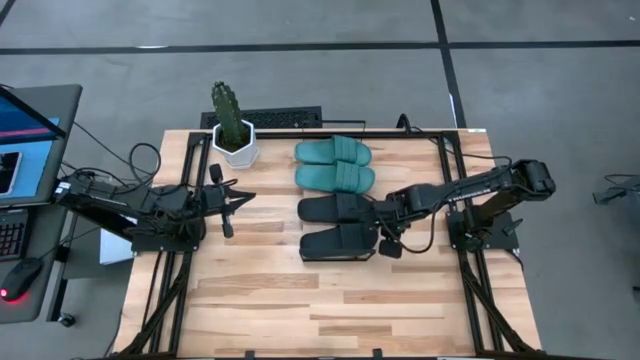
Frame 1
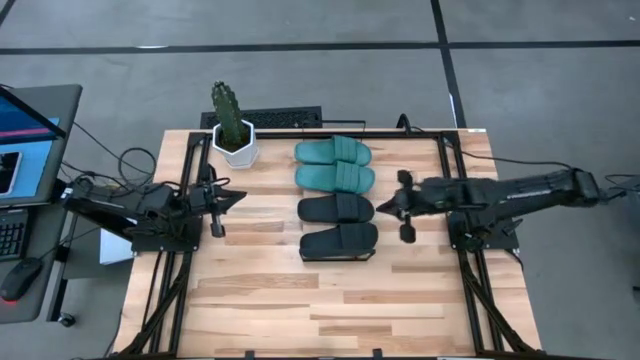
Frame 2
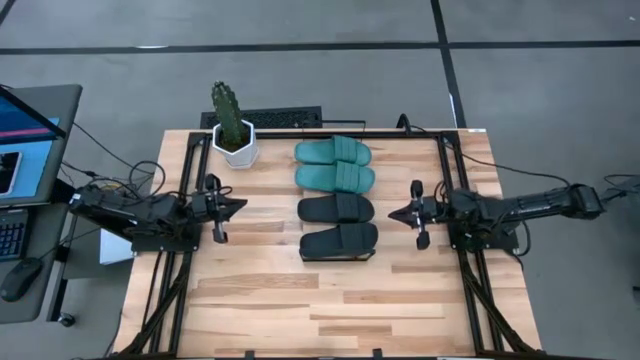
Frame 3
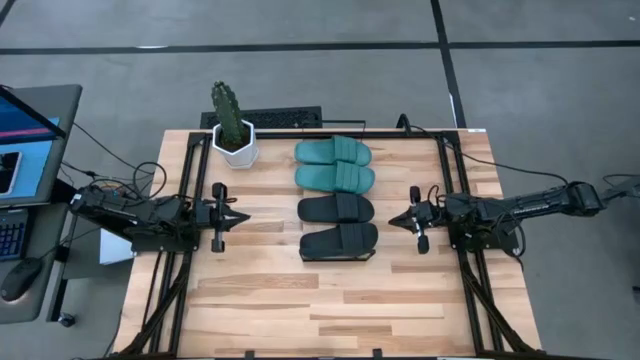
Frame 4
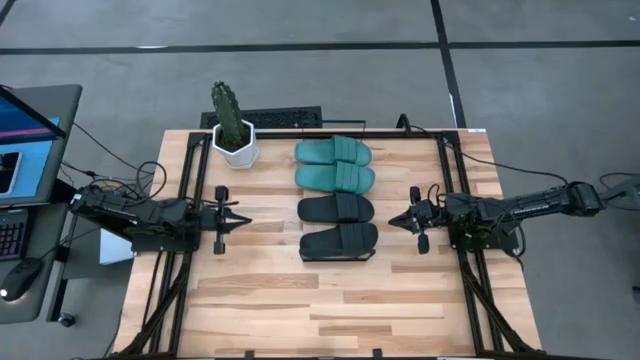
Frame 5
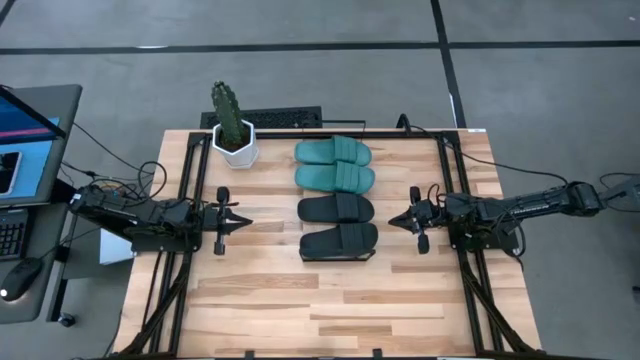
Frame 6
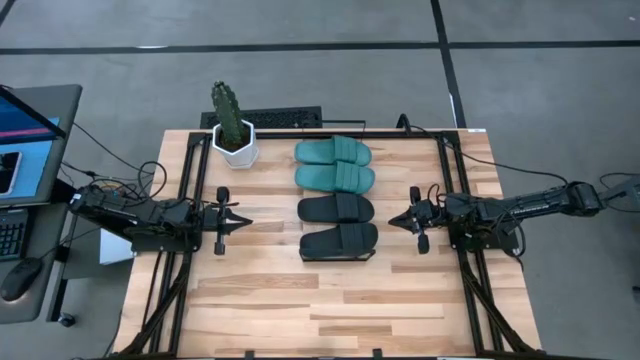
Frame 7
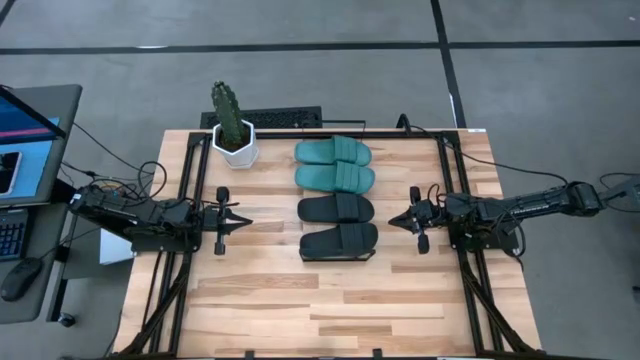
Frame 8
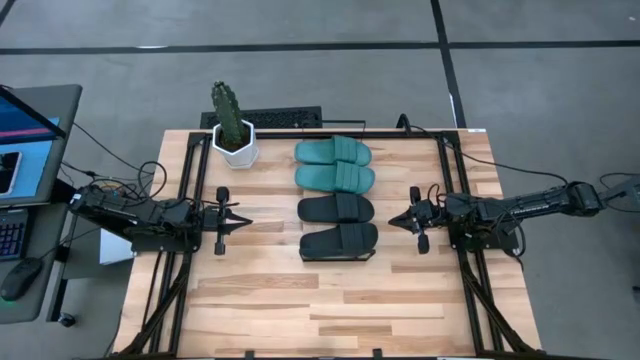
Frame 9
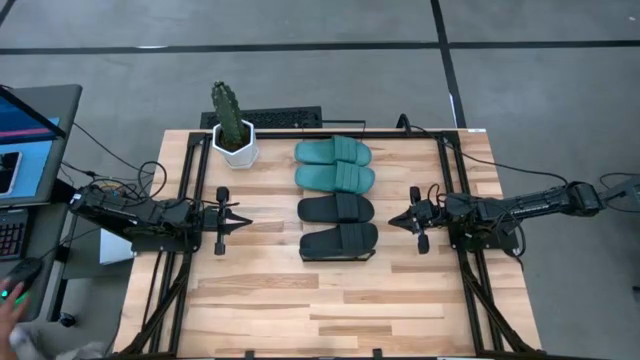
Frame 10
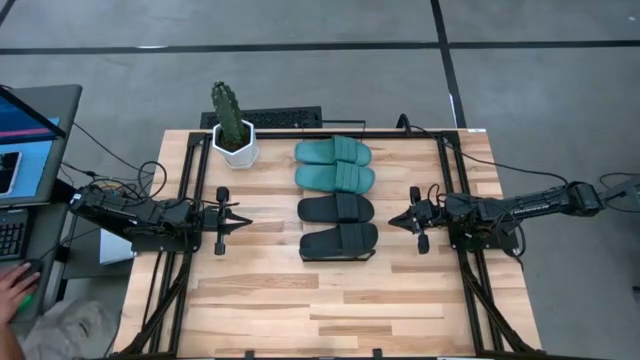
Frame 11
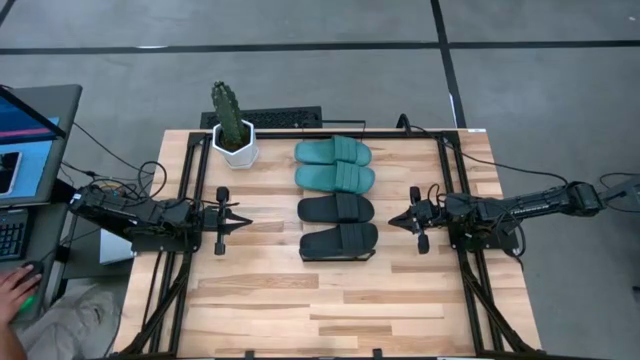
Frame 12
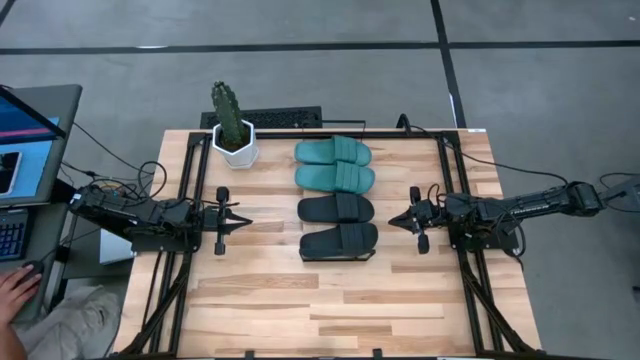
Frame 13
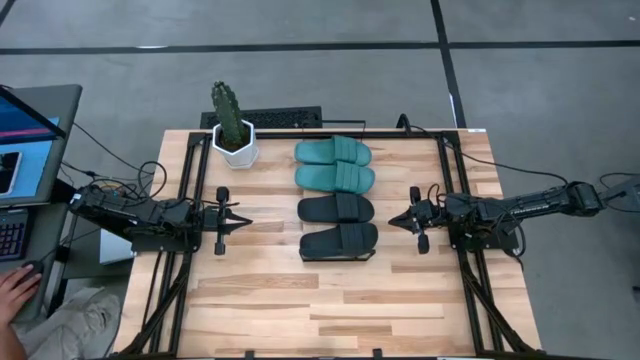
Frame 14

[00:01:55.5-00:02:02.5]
Task: Pick and place slides into the shelf
Return to Home Position

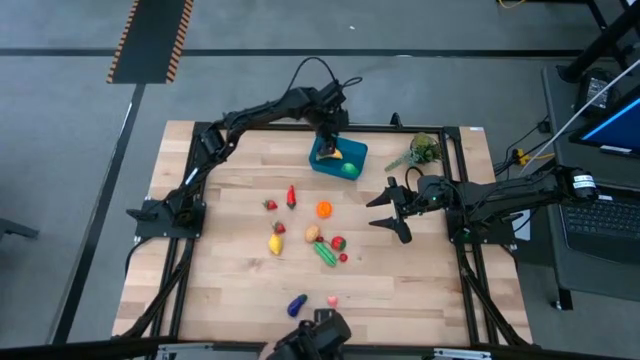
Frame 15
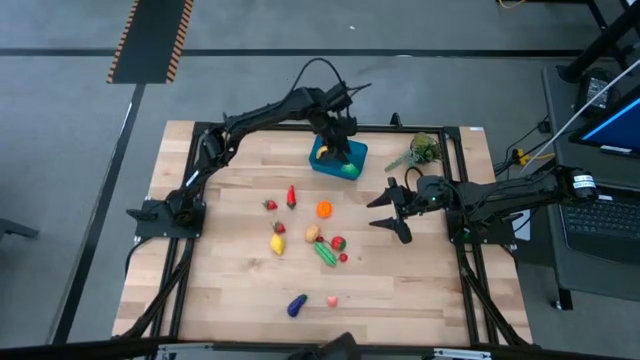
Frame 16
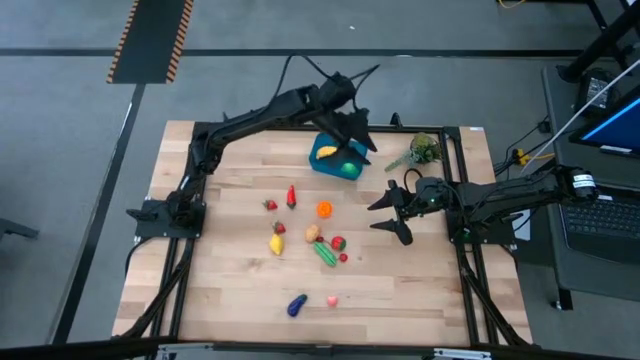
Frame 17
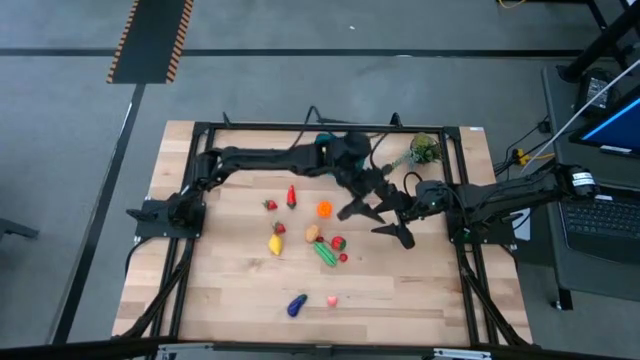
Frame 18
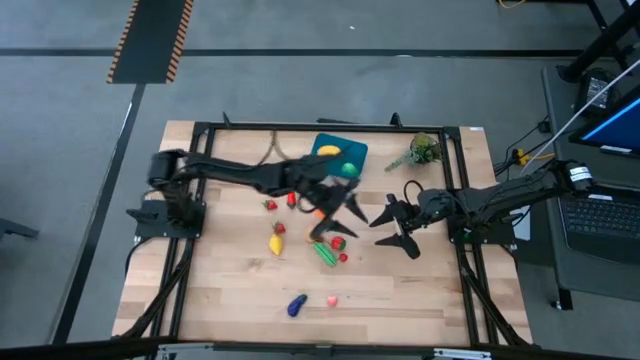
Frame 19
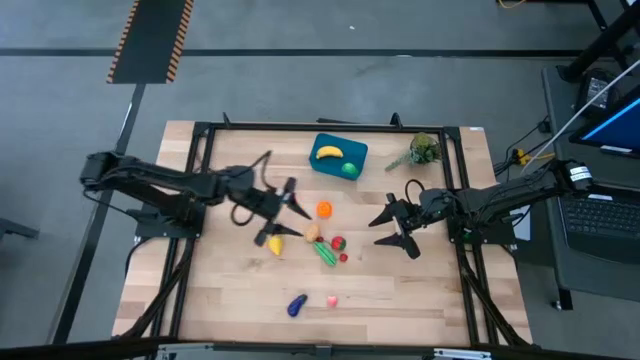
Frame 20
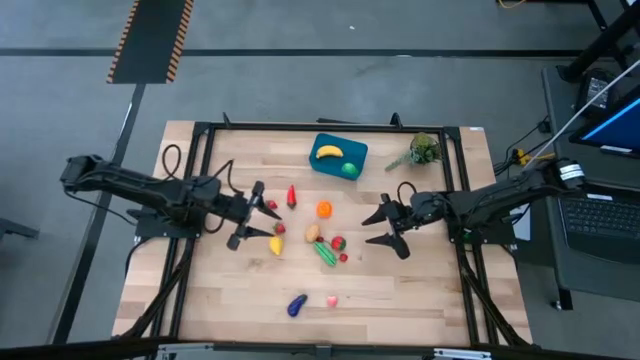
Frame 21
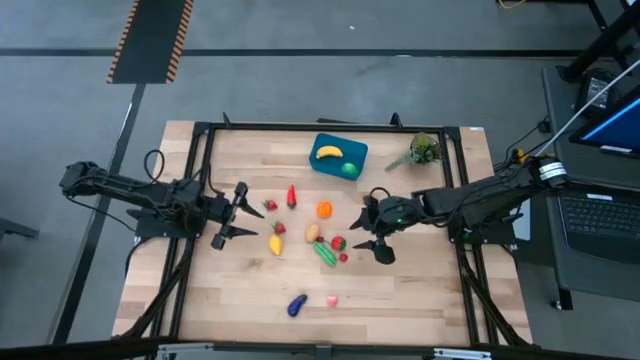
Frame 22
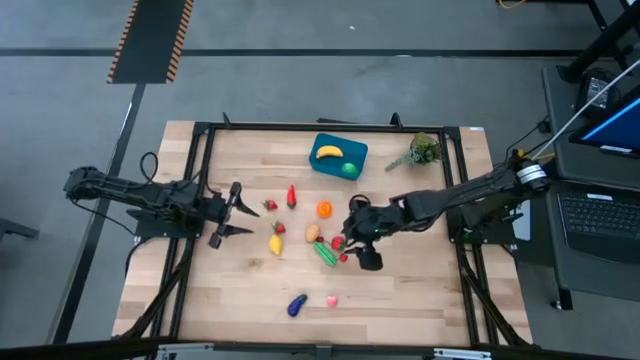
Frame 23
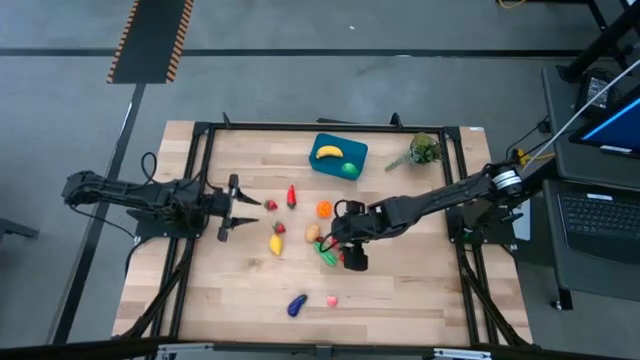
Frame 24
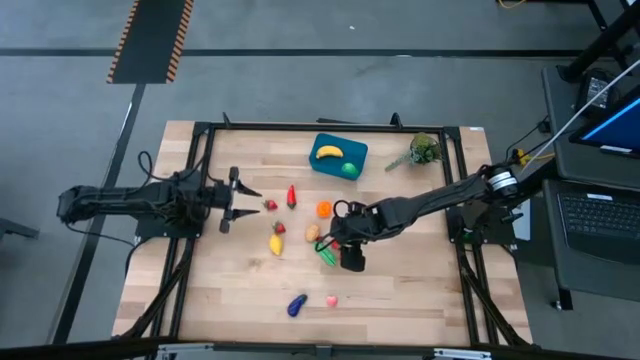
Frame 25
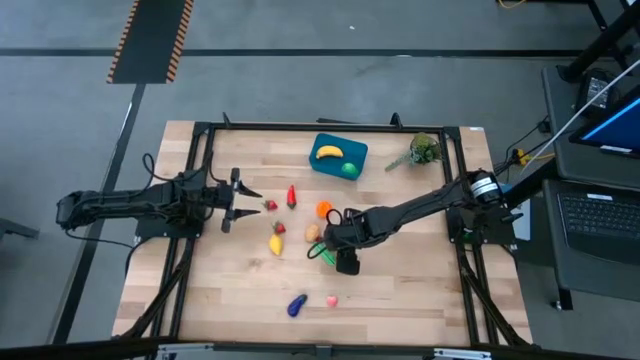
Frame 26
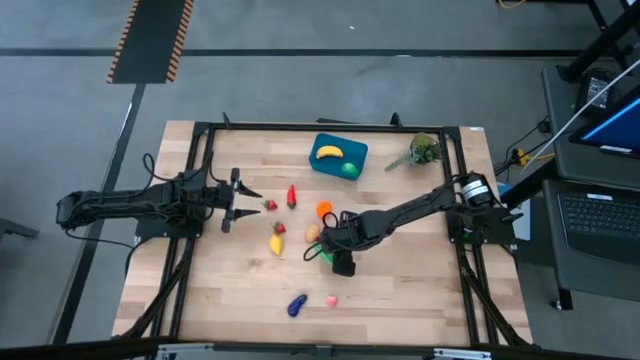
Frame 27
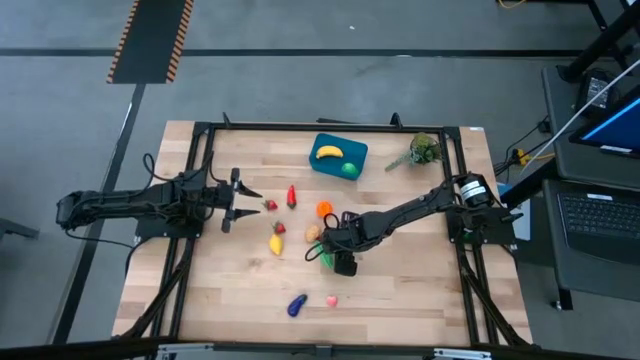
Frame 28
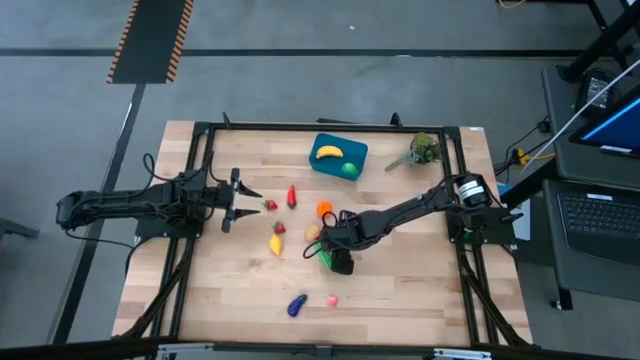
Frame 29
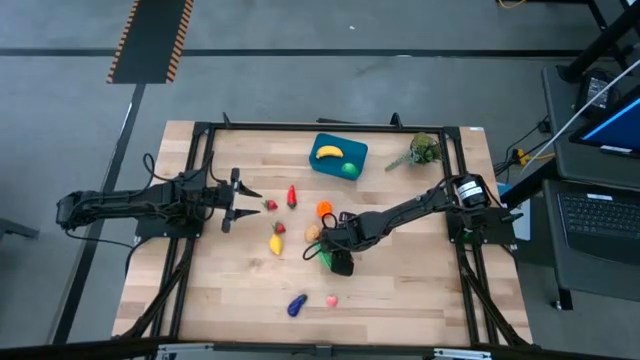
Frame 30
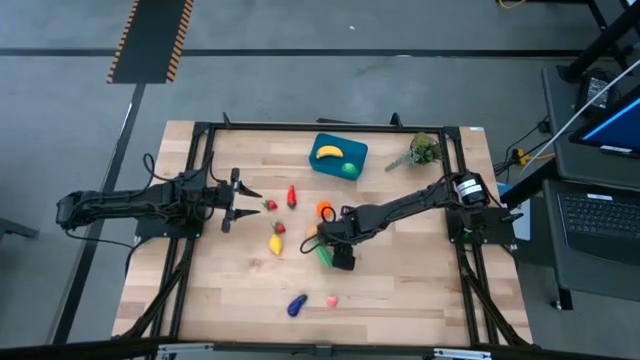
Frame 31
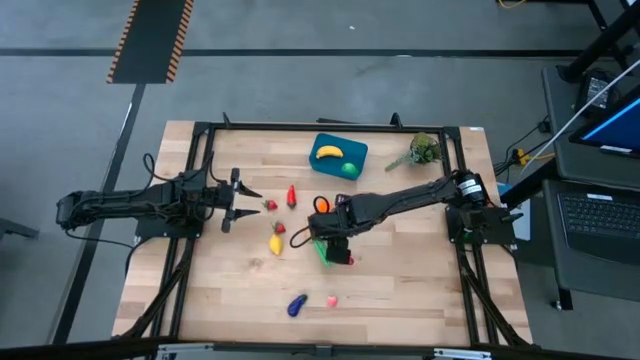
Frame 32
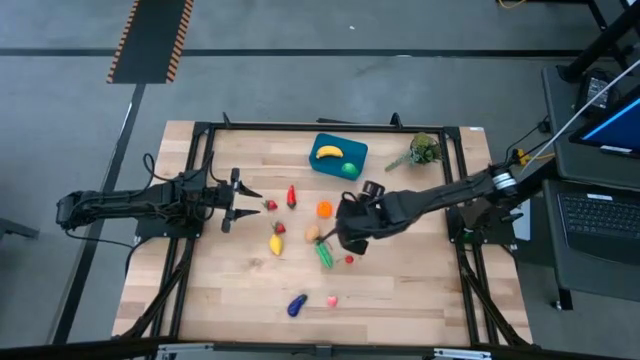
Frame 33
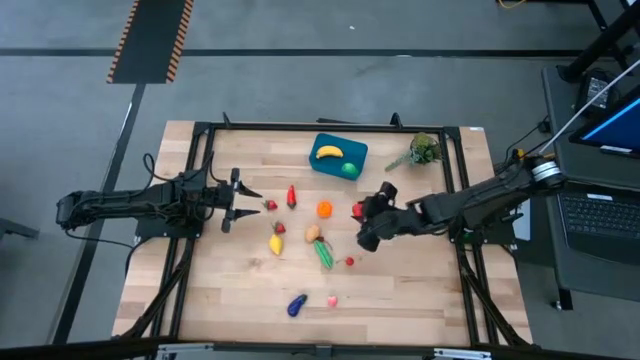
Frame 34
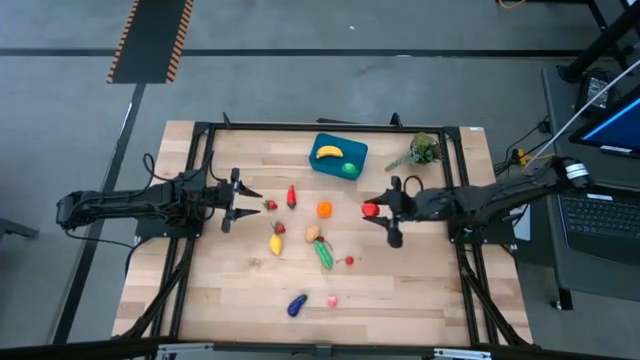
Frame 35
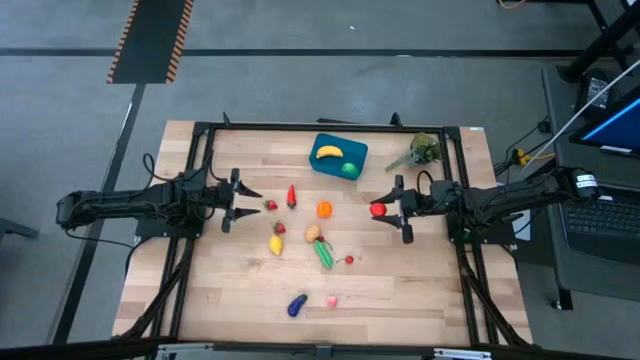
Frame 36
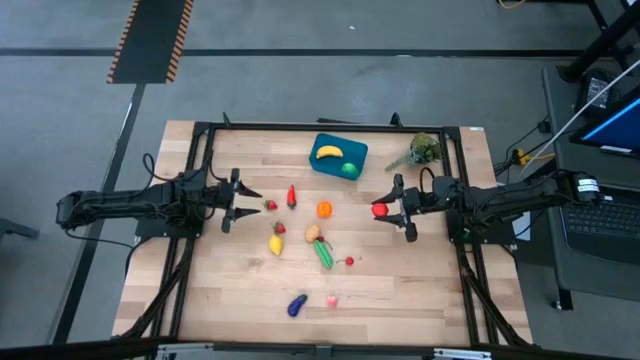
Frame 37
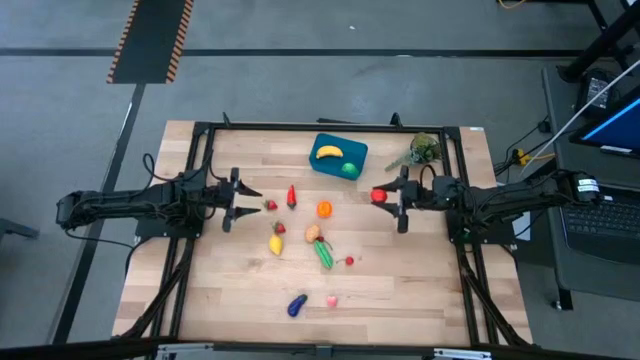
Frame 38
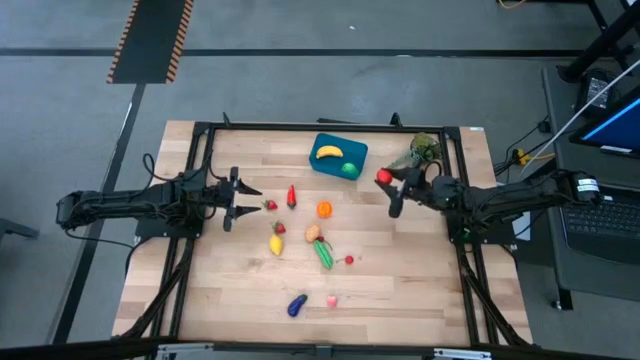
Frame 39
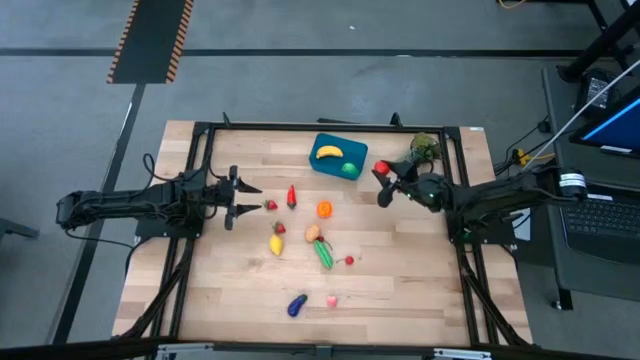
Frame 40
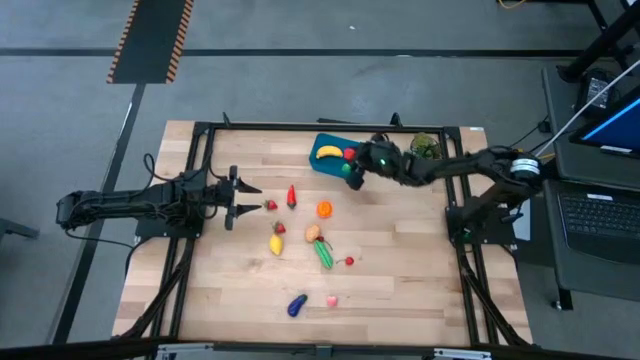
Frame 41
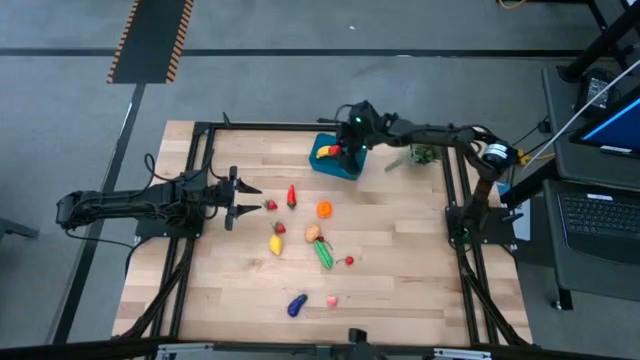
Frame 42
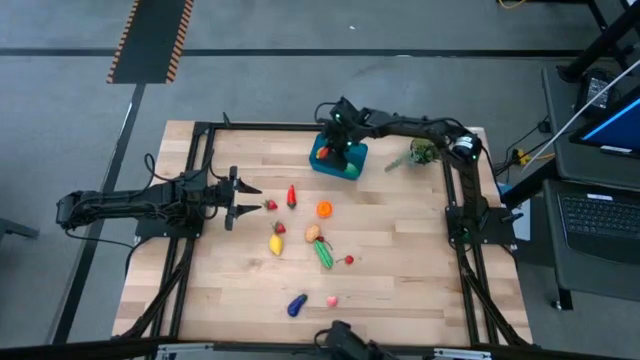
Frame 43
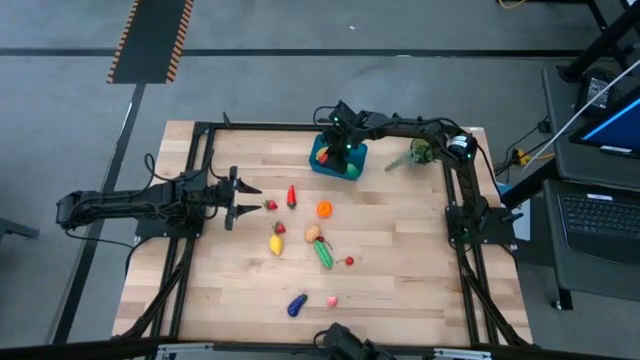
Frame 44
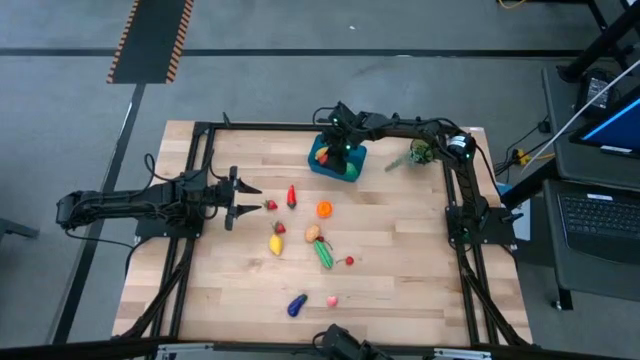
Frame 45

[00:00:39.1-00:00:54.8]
Task: Pick and placing Produce into tupperware
Put the bottom red strawberry into the blue bin
